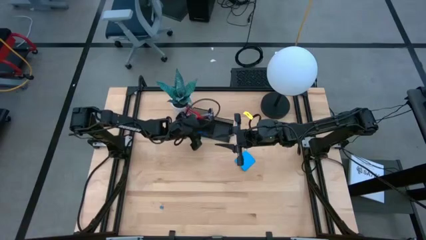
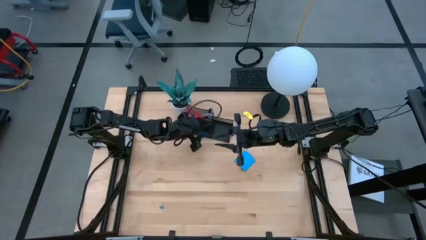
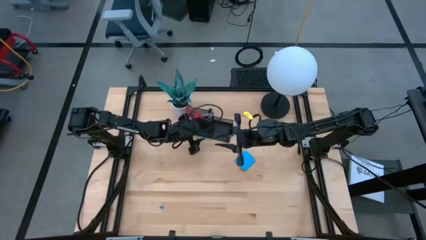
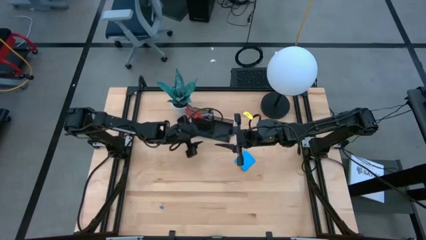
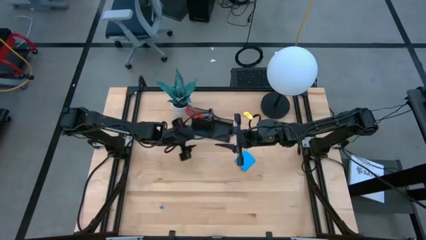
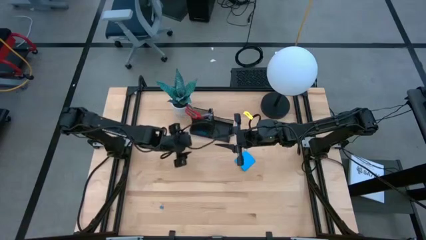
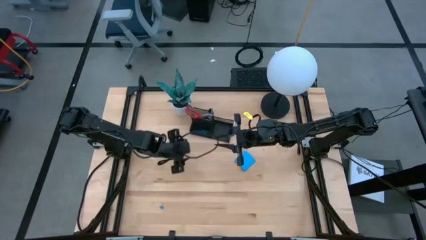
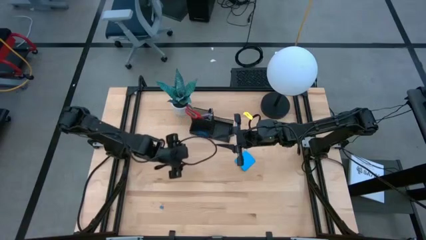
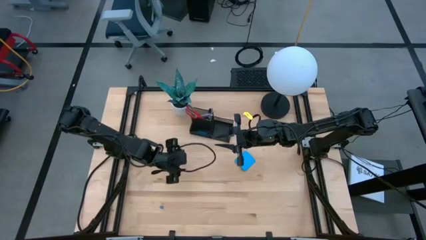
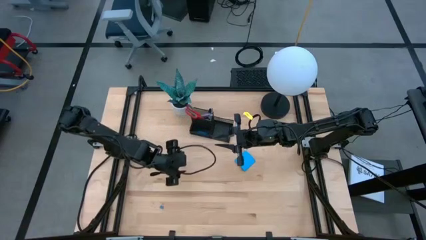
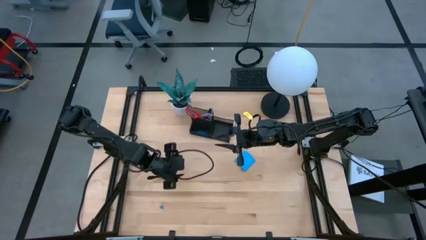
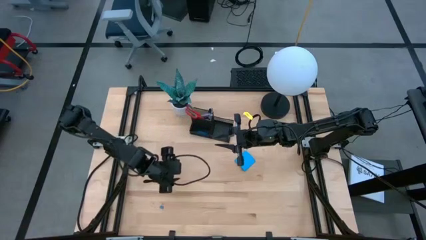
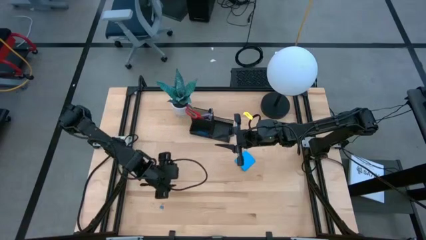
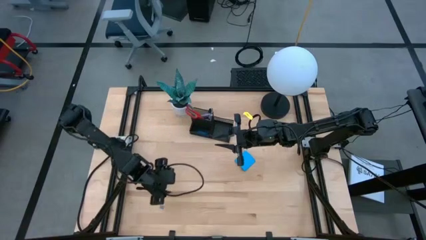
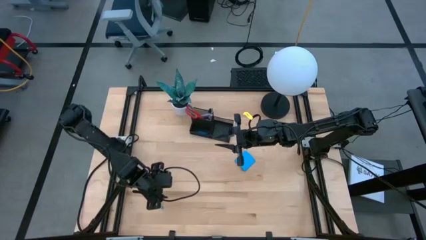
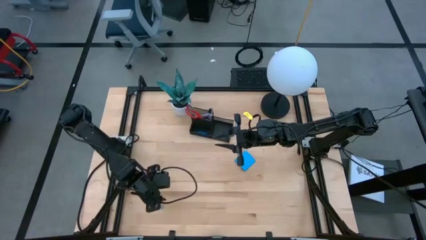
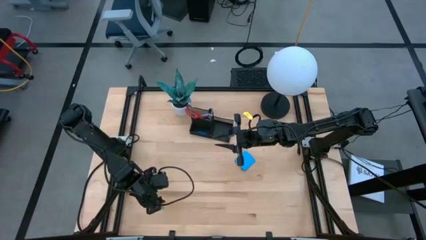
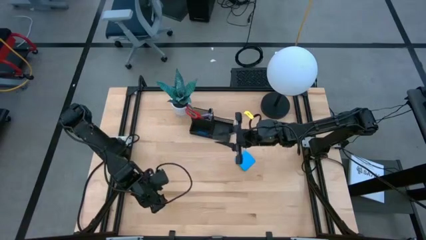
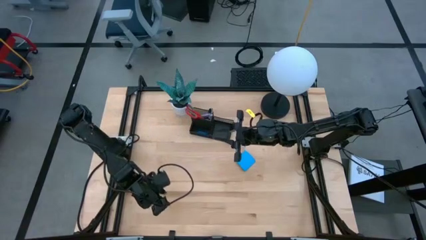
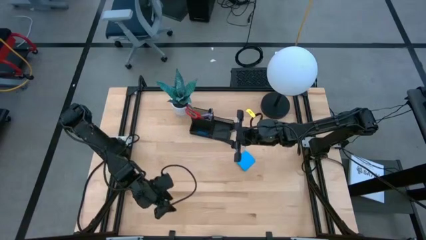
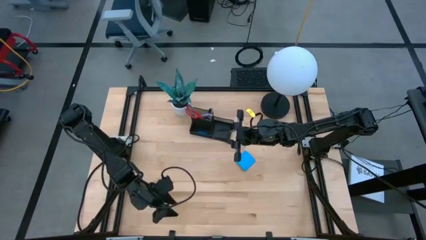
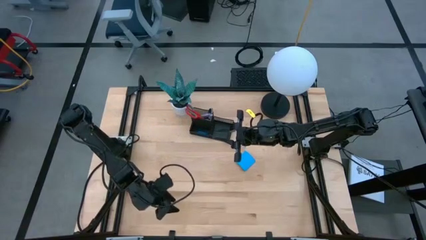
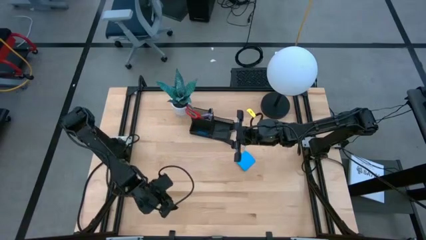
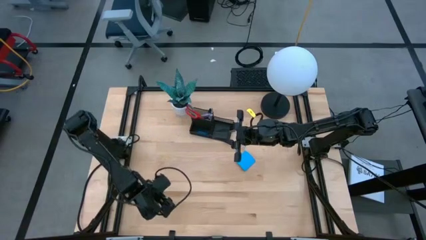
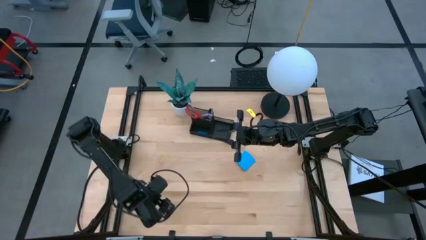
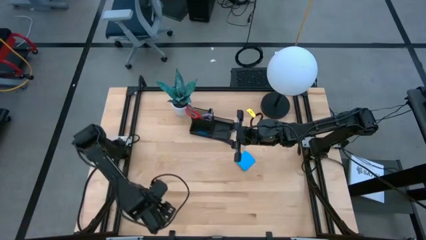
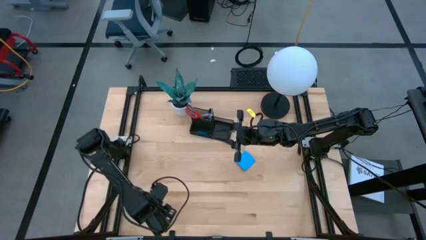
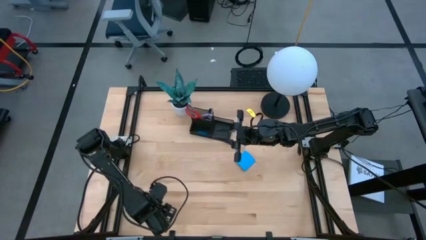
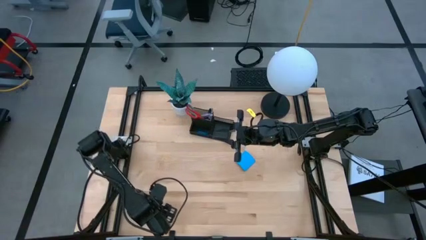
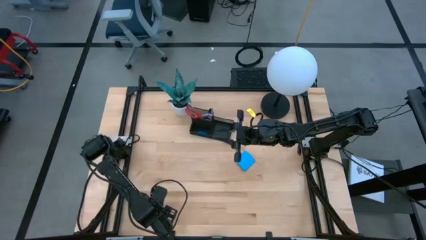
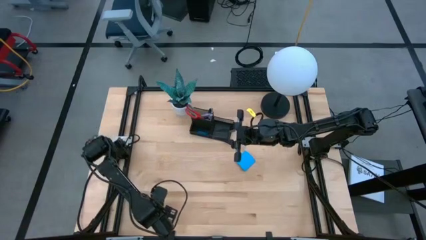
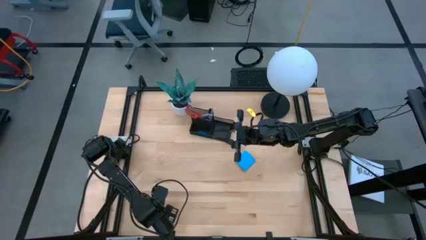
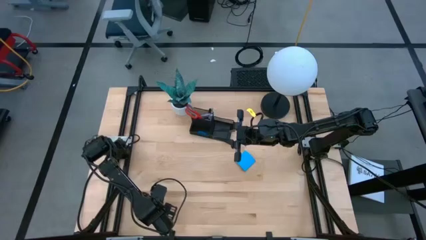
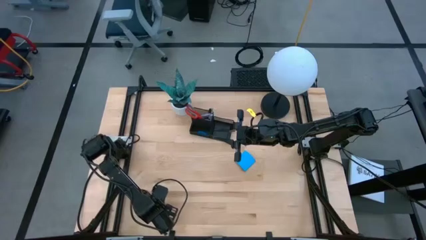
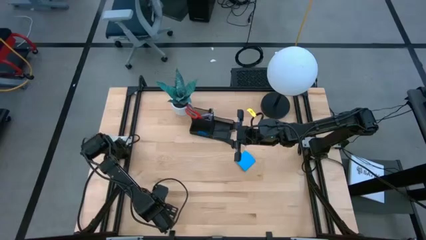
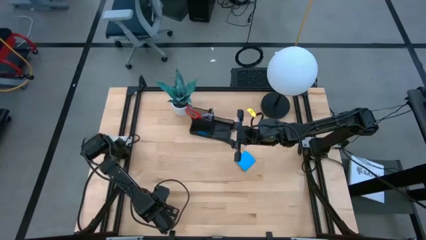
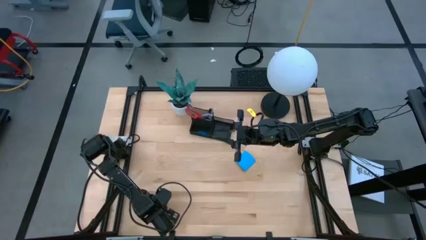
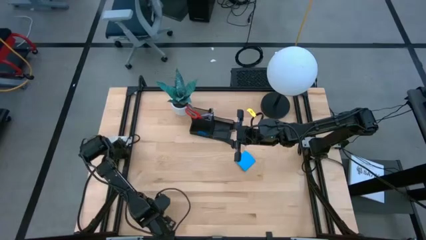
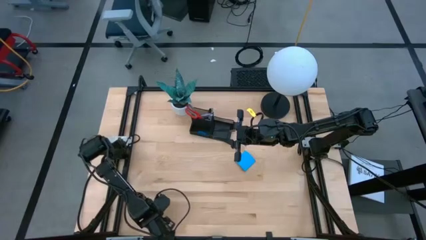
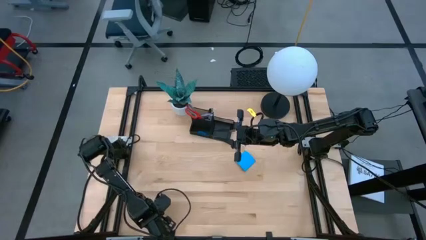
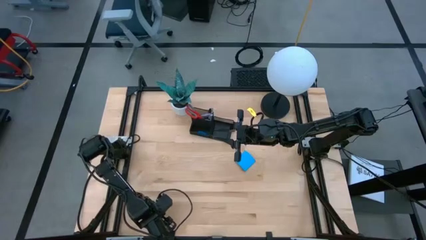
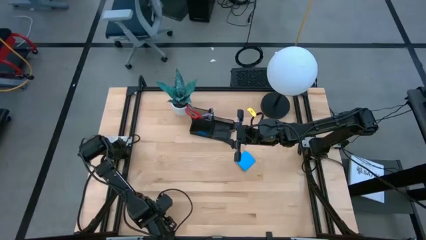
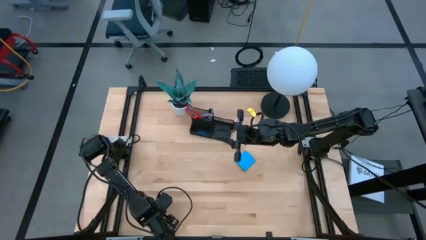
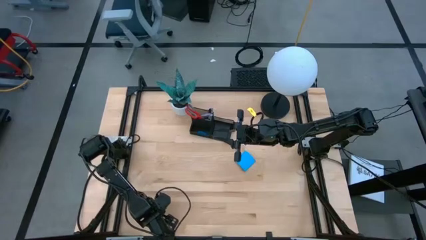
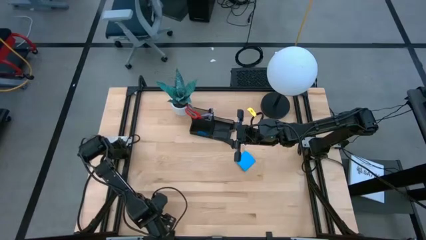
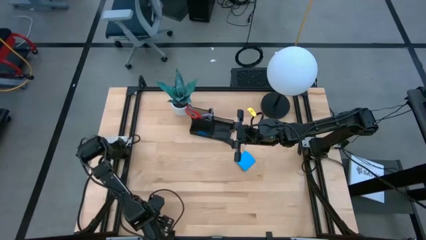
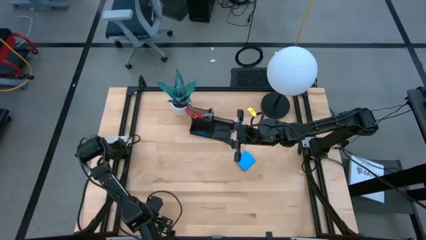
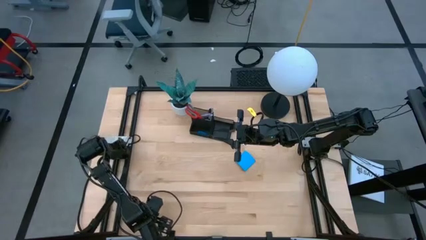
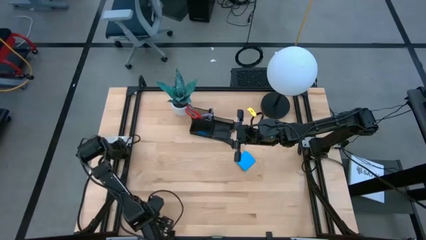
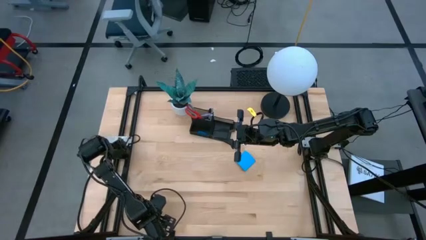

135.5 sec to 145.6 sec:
Task: Pick and place office supplies into organizer
Put the blue paper clip into the black desk organizer

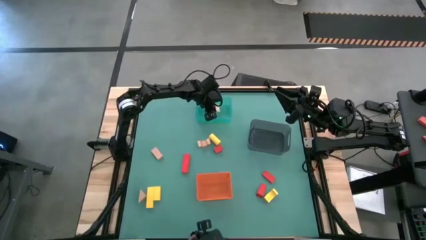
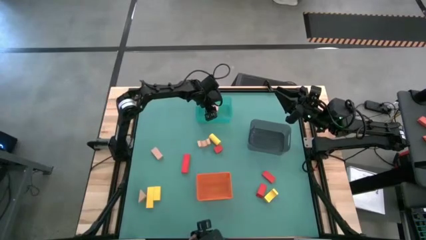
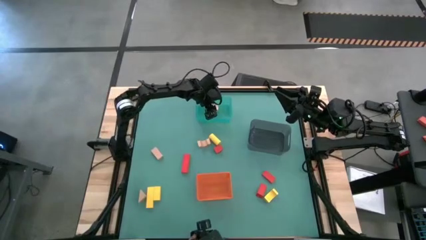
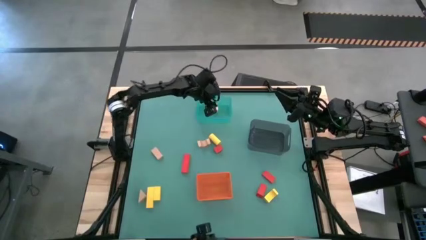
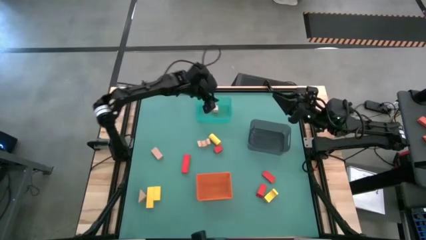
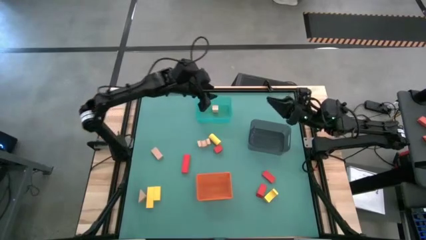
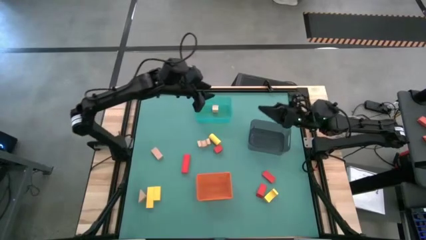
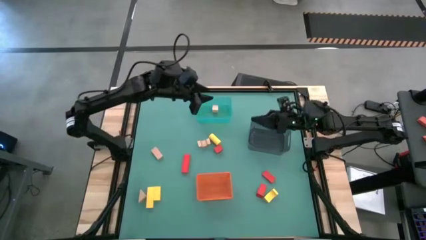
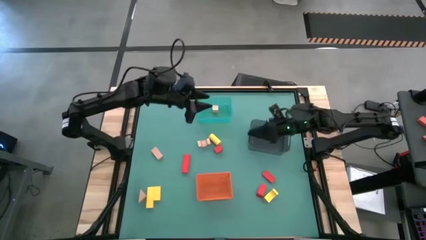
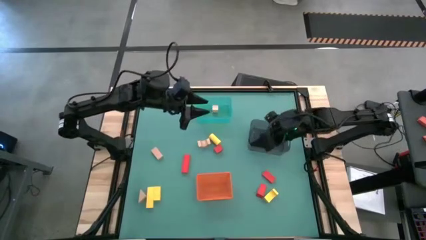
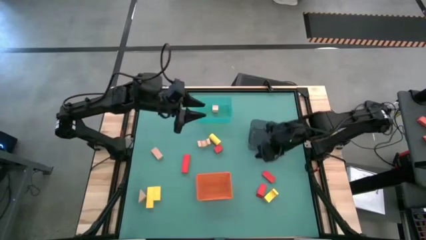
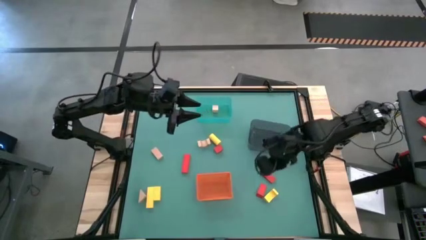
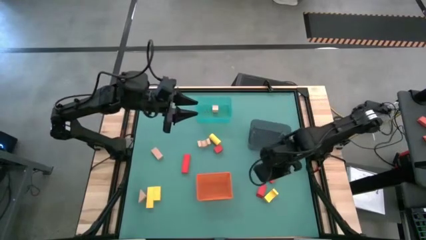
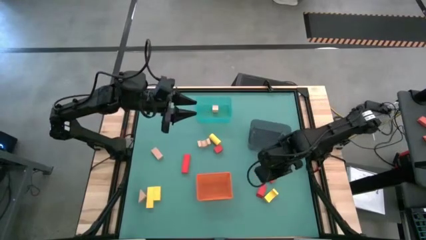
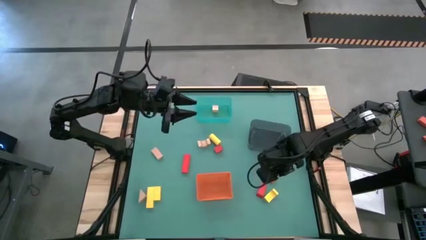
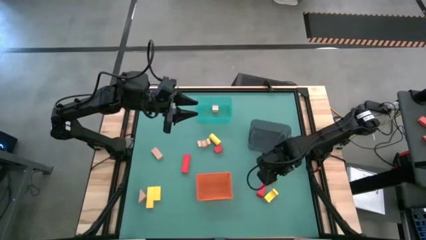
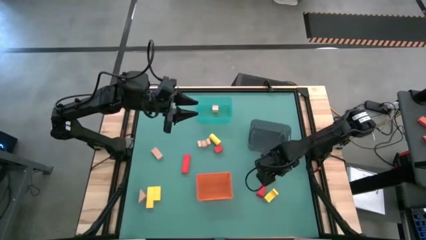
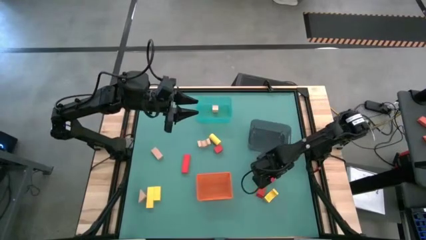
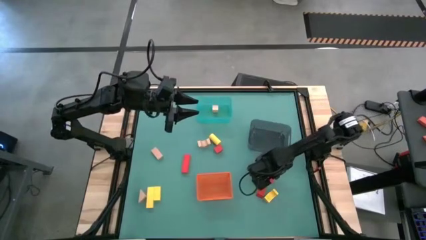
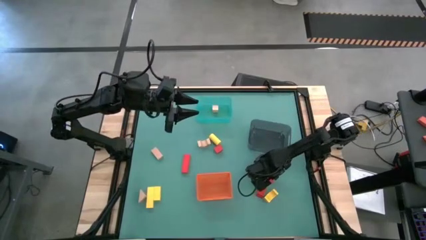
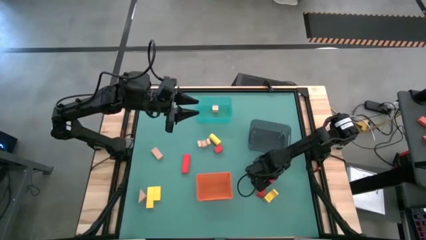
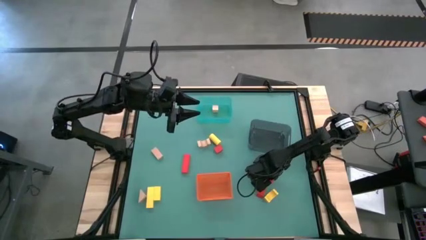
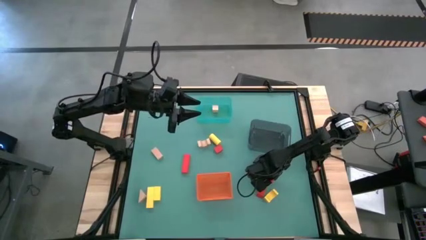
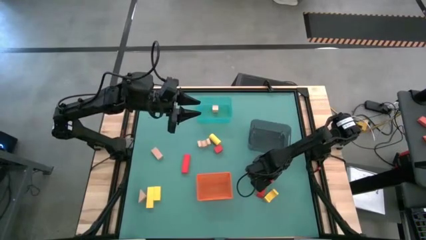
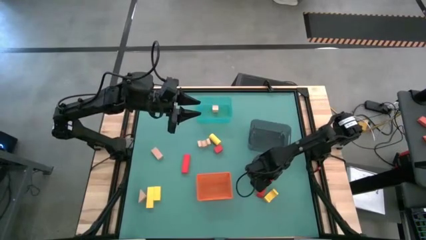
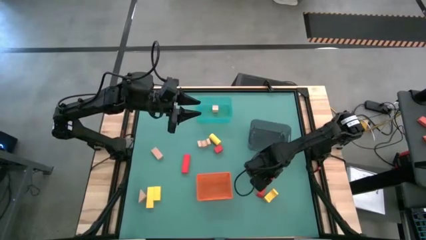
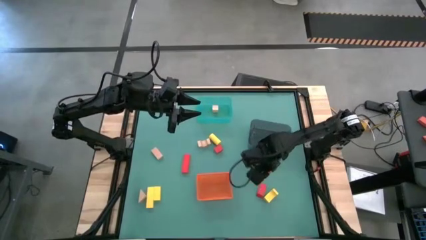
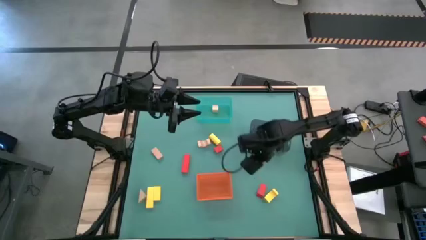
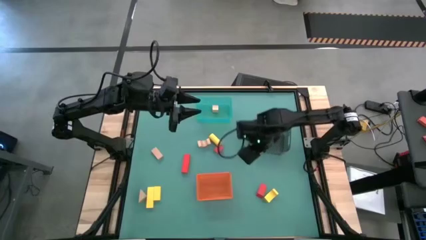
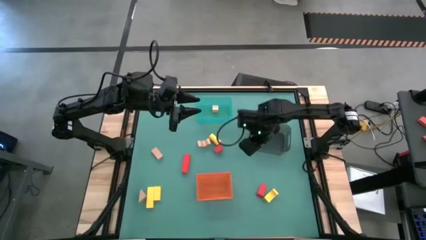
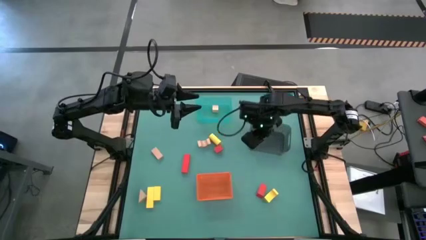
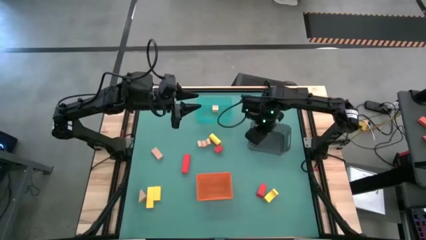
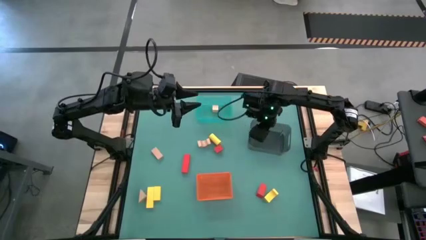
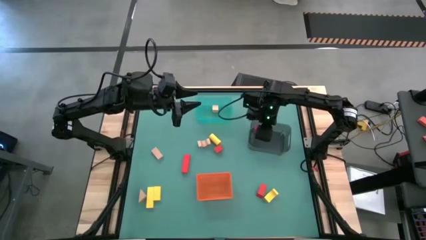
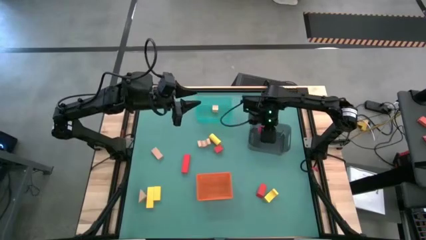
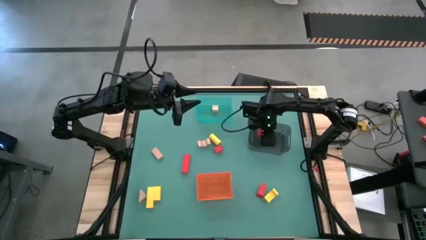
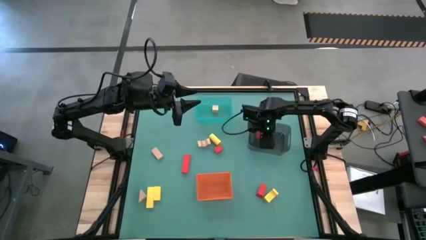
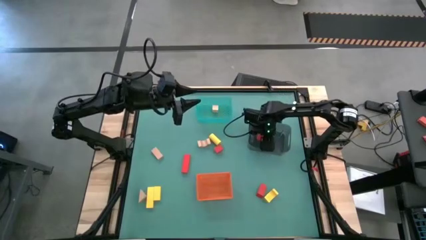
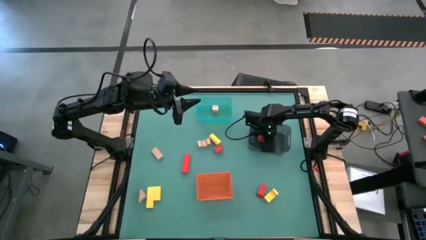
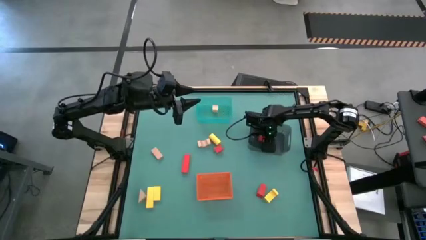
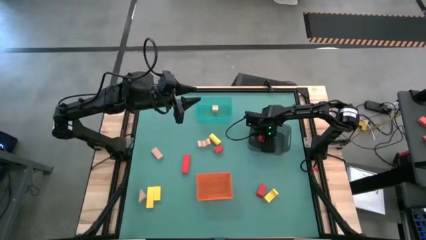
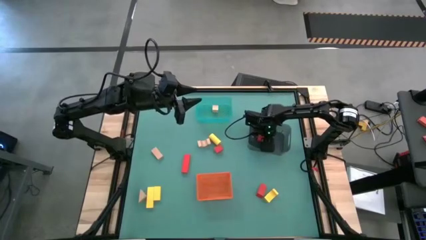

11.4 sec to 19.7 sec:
Task: Sort & place blocks by color
Put the red block into the black bin
